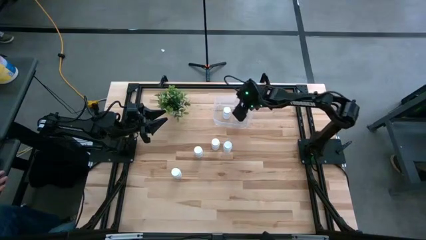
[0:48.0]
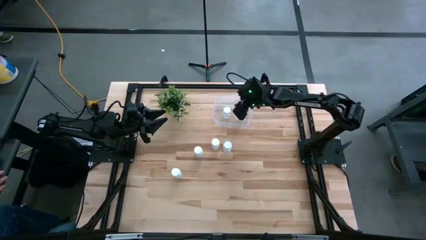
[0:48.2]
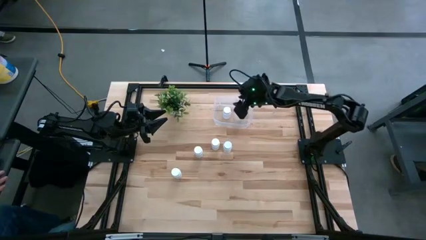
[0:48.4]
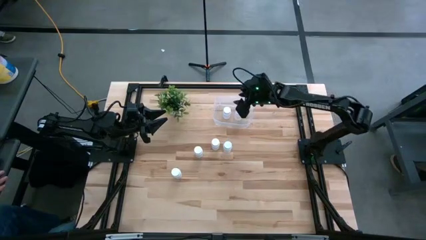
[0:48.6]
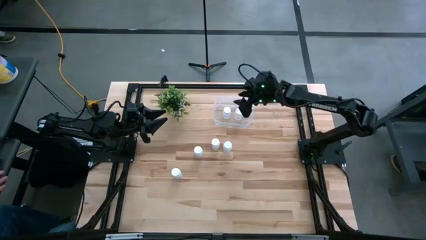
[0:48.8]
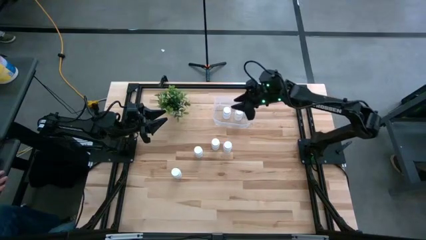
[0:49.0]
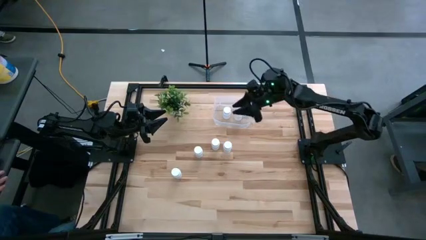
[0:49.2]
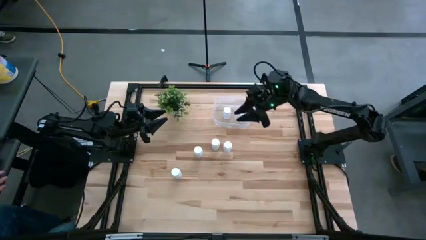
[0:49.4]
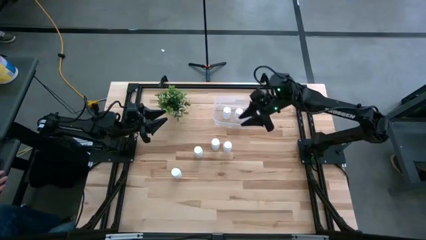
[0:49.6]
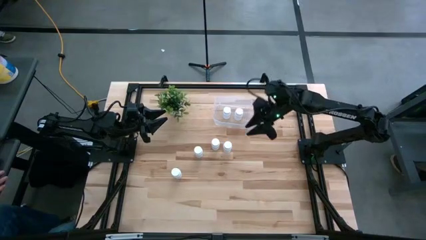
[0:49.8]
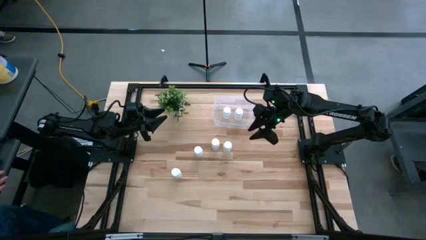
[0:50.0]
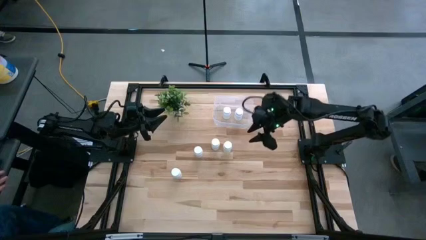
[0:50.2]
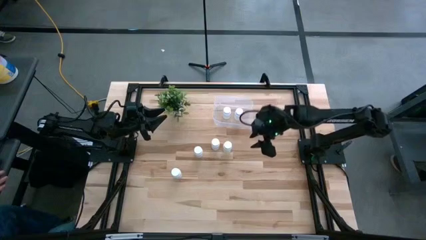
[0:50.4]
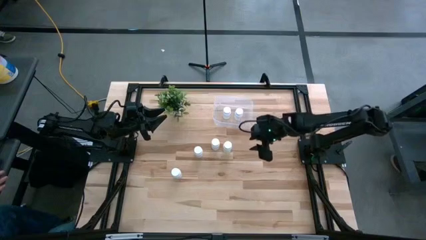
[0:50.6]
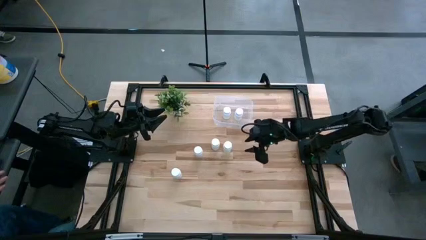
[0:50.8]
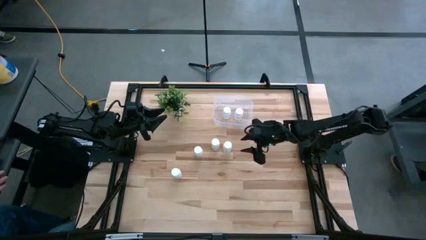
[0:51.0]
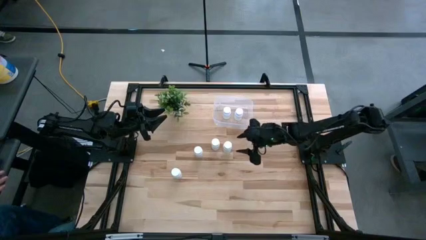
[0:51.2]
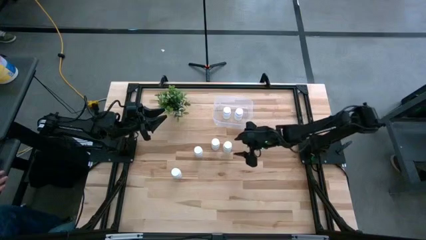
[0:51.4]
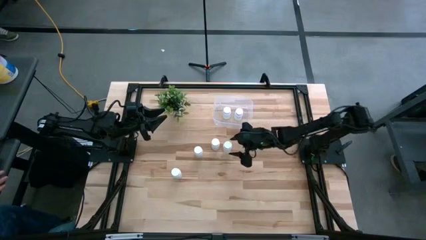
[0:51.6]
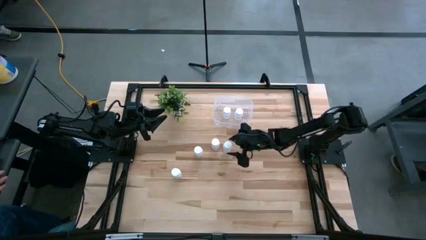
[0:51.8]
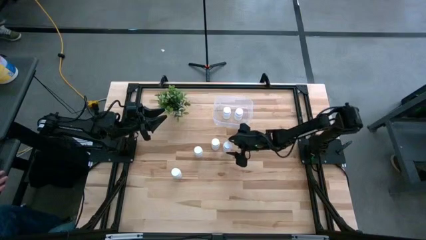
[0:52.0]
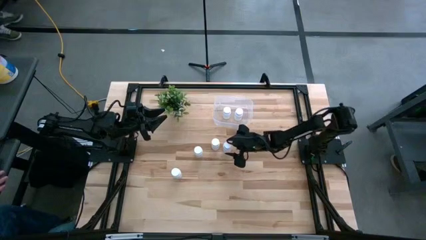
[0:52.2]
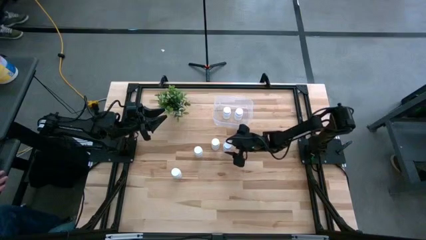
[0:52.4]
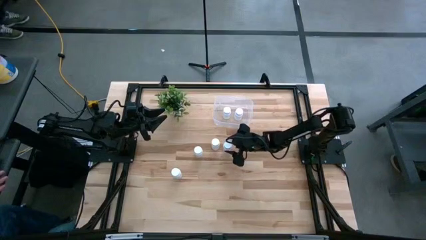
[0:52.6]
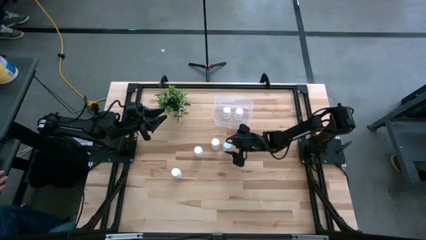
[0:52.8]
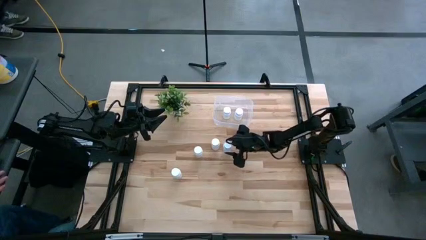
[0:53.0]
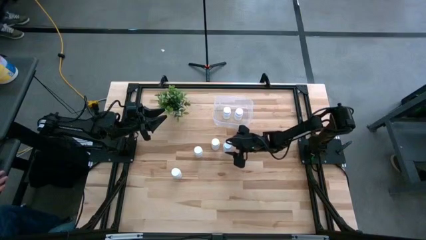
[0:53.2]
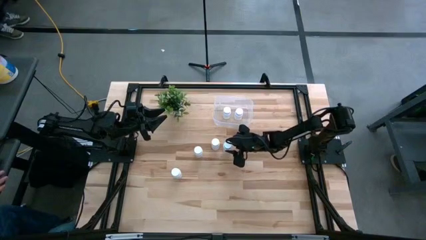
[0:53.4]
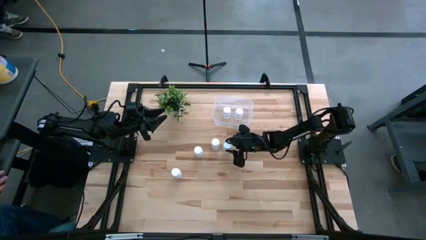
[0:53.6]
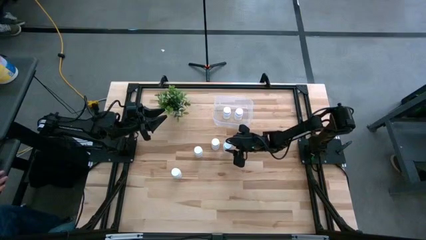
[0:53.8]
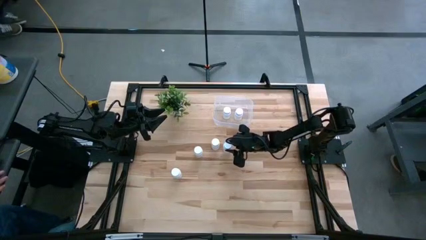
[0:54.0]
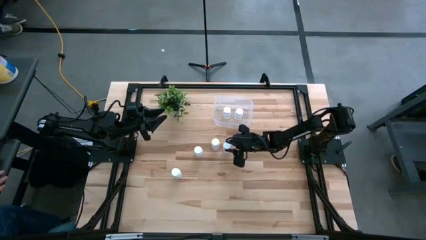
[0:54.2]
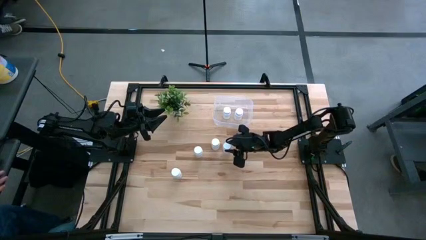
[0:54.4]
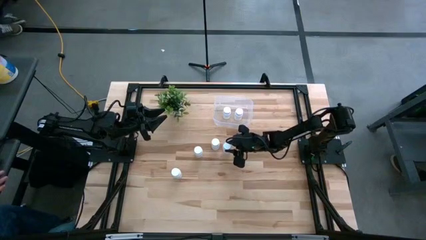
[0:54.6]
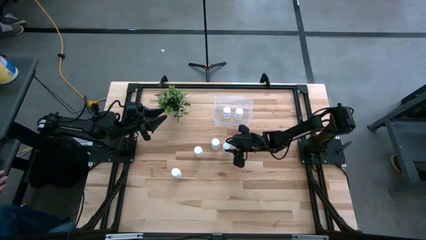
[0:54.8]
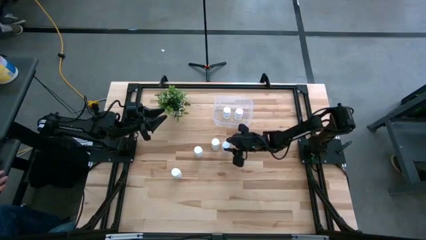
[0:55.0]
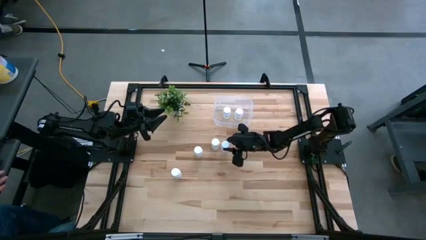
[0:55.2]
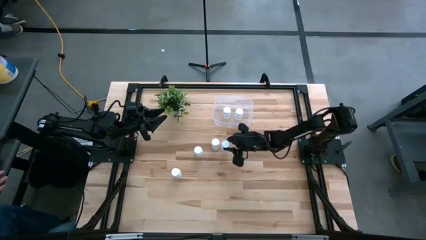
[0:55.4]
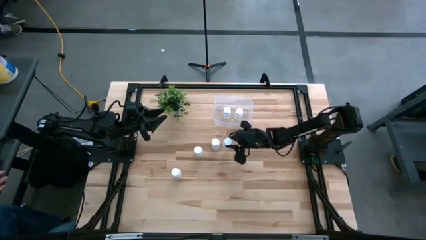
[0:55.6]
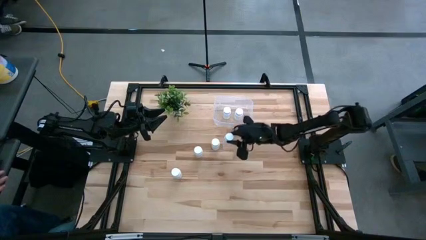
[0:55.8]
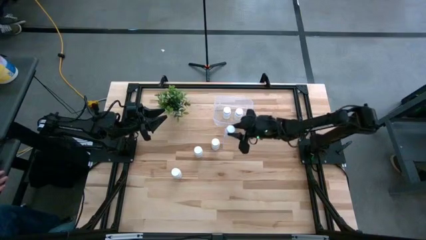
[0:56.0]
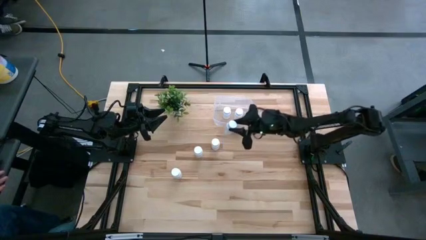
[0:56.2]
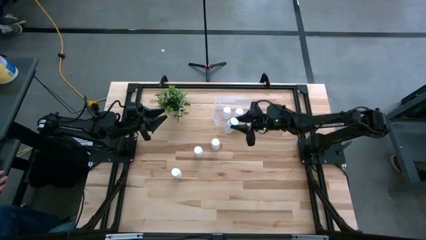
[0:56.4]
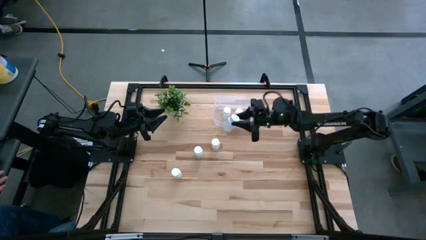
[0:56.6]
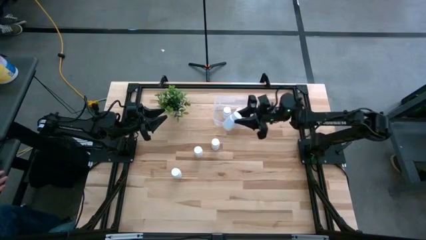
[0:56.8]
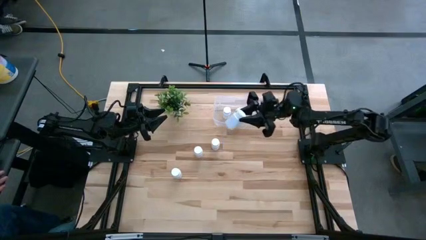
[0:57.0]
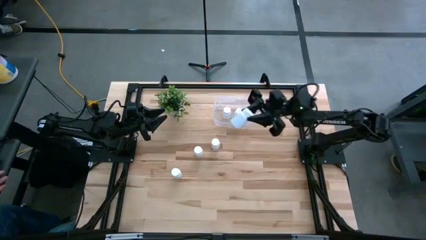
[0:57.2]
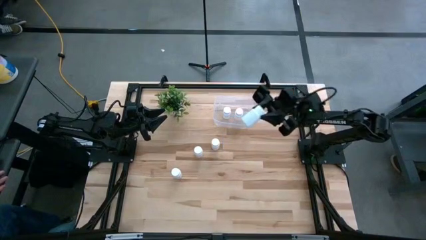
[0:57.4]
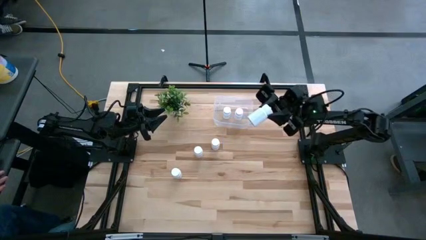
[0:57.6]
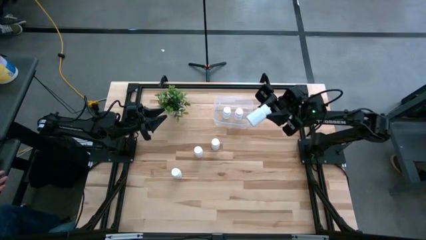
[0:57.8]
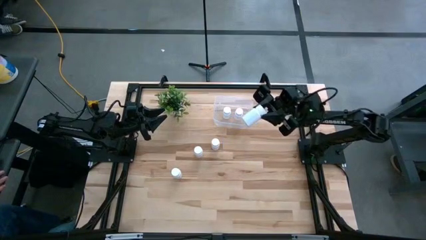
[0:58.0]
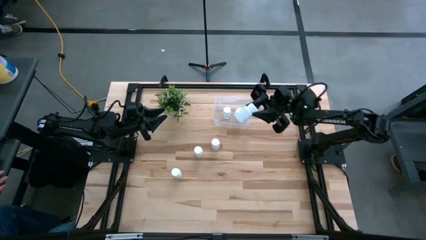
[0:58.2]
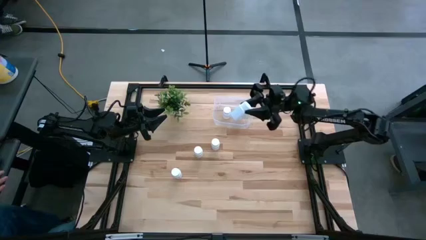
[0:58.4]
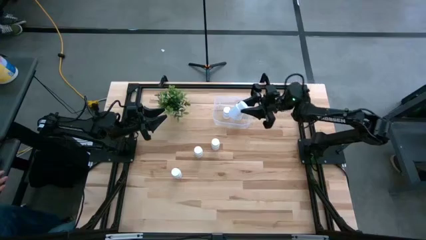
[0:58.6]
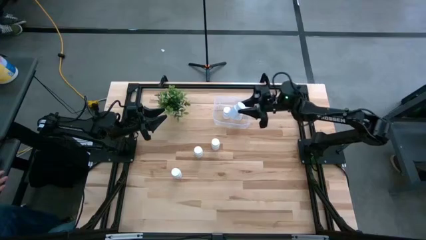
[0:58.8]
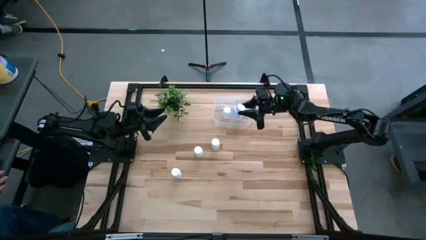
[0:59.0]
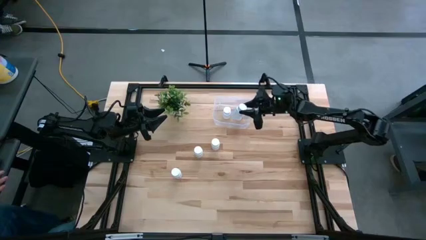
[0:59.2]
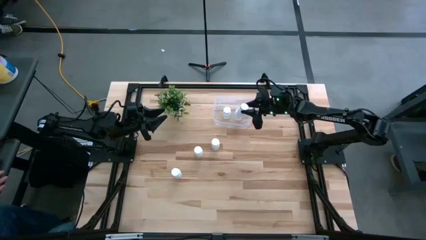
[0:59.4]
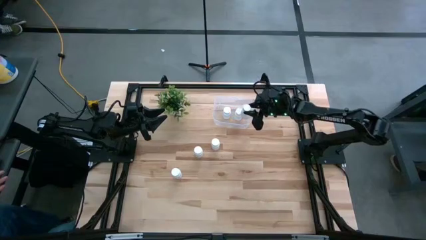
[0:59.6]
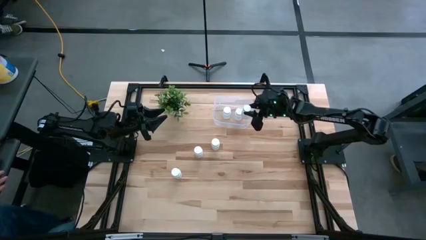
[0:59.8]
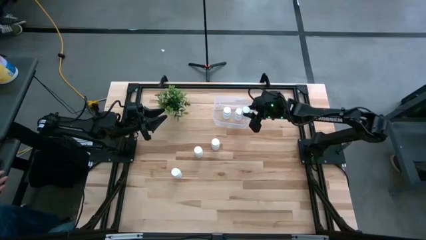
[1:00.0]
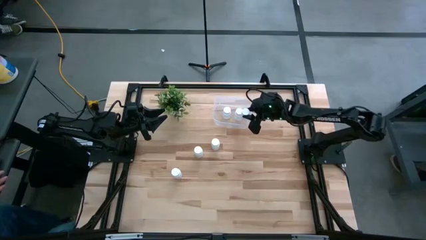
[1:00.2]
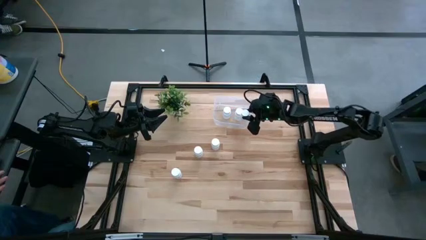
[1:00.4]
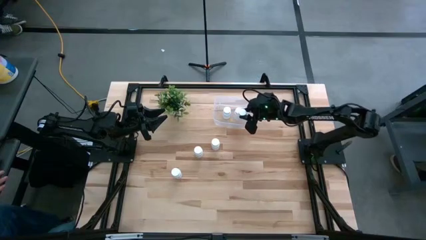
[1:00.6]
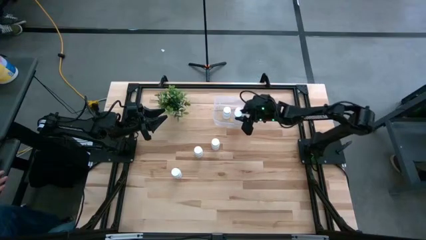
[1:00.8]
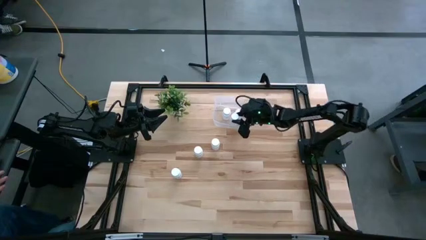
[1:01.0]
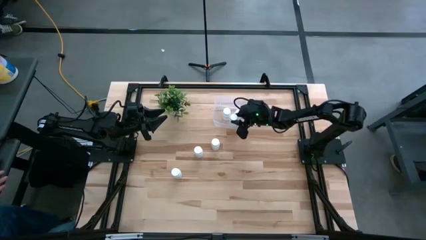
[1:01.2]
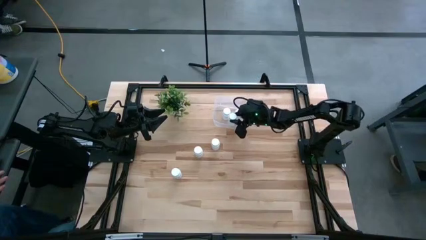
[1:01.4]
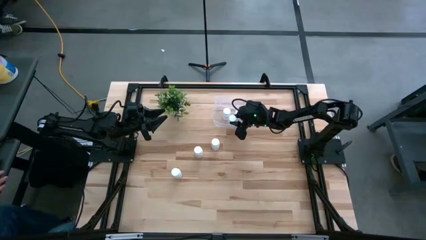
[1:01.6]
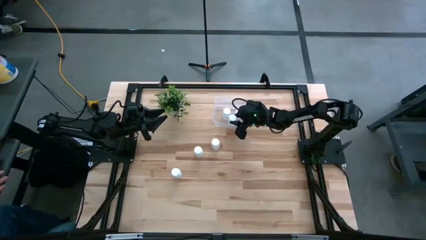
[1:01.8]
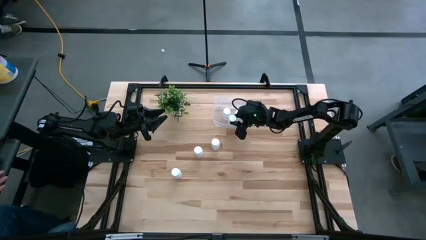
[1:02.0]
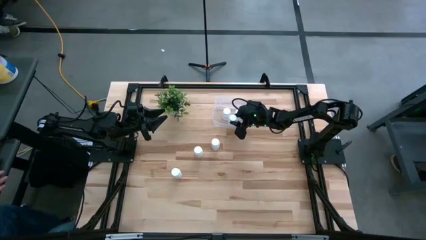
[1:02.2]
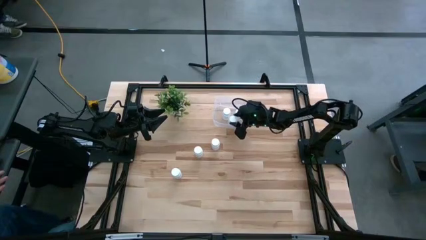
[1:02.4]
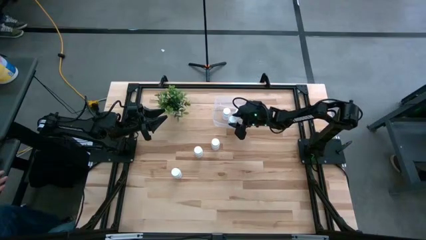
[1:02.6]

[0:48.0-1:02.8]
Task: Pick and place pill bottles into a basket
Put the white pill bottle into the transparent container
